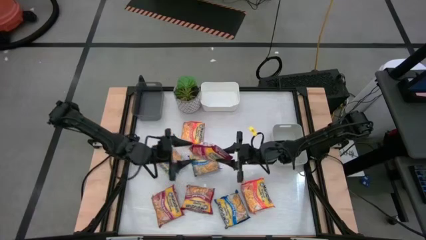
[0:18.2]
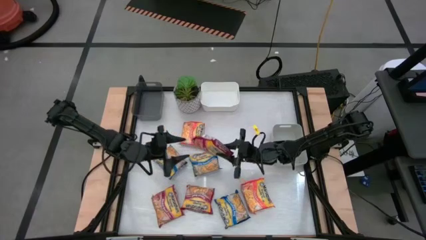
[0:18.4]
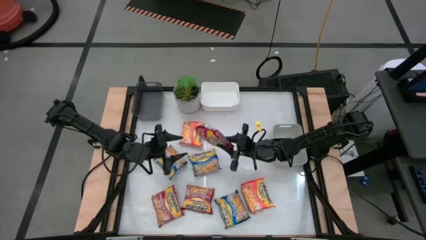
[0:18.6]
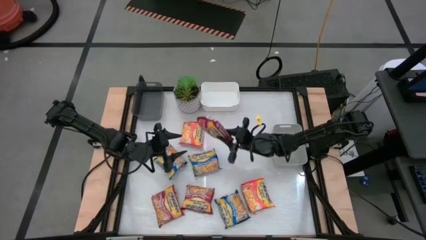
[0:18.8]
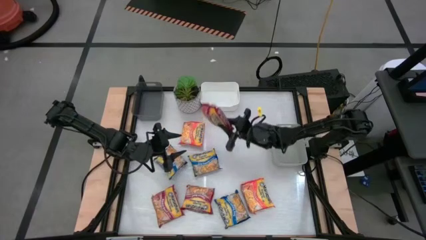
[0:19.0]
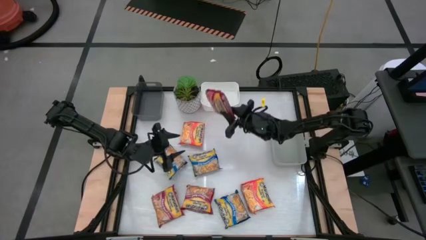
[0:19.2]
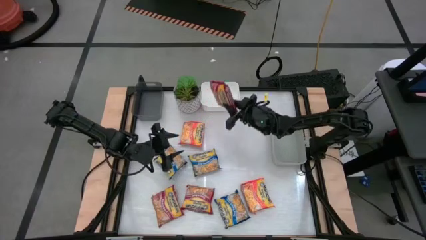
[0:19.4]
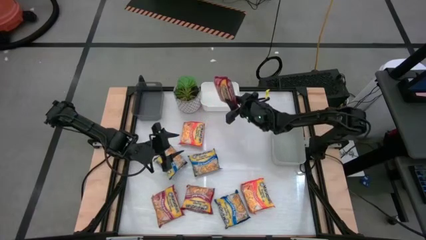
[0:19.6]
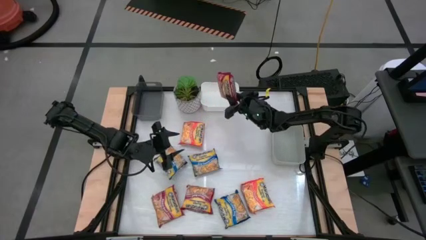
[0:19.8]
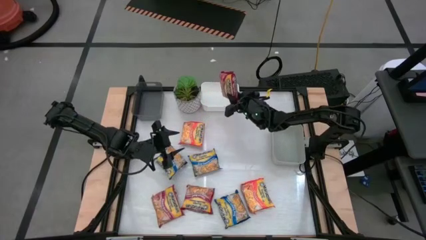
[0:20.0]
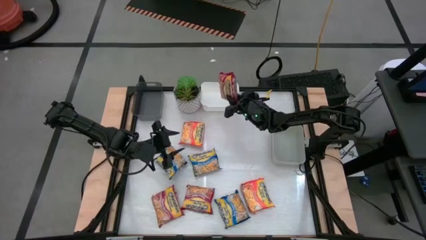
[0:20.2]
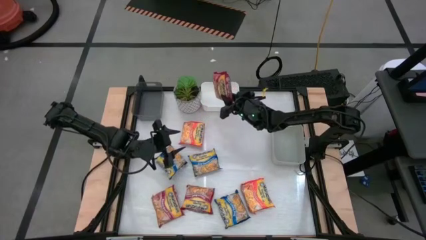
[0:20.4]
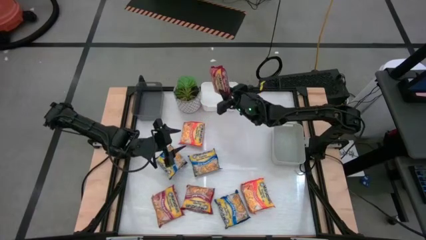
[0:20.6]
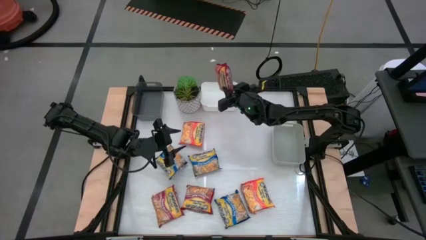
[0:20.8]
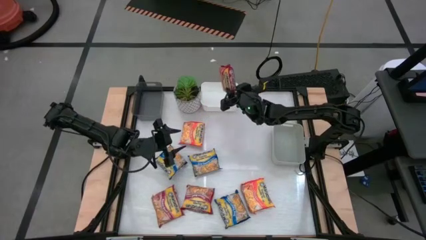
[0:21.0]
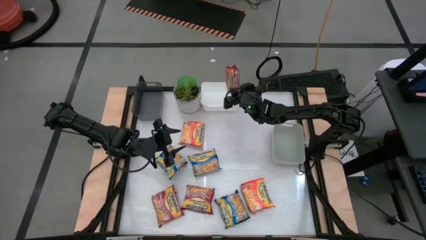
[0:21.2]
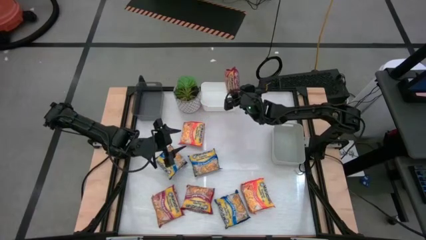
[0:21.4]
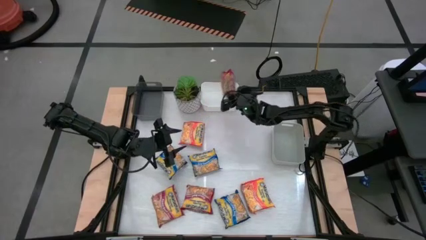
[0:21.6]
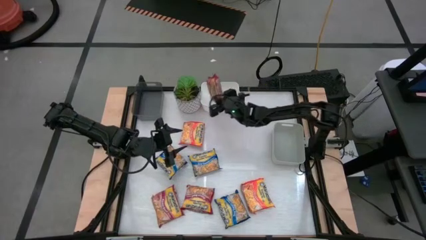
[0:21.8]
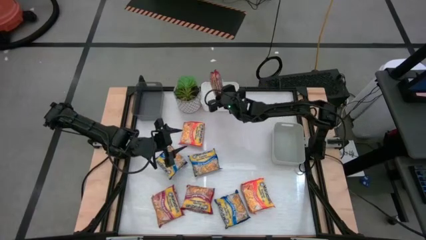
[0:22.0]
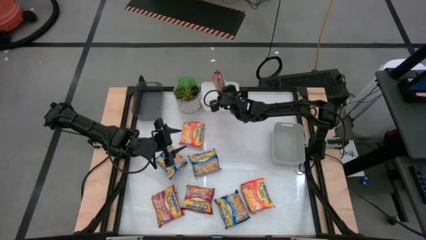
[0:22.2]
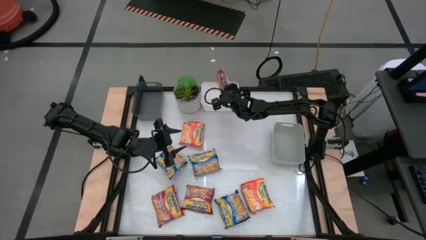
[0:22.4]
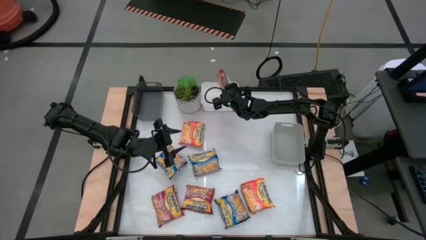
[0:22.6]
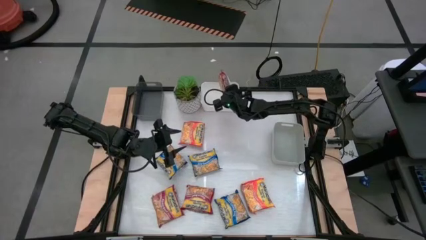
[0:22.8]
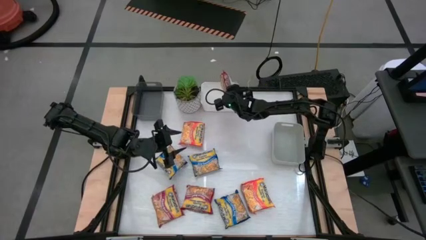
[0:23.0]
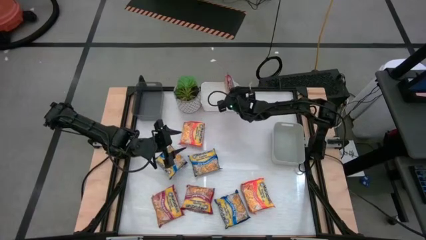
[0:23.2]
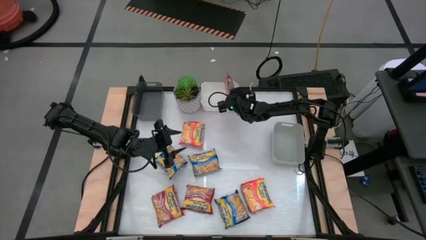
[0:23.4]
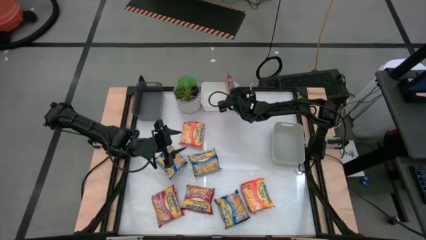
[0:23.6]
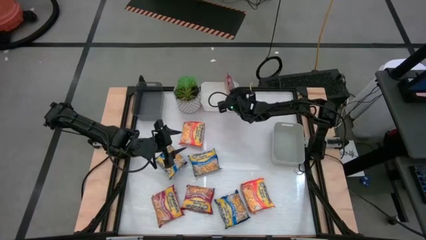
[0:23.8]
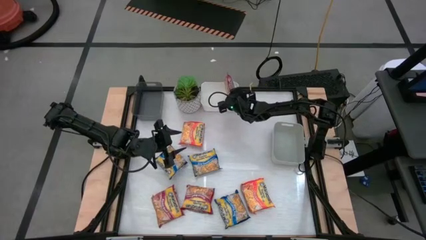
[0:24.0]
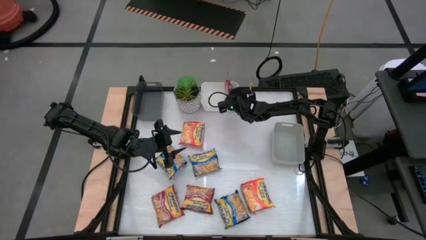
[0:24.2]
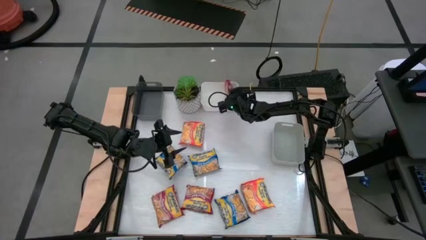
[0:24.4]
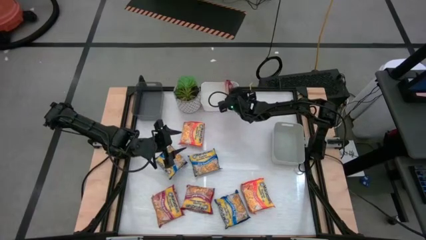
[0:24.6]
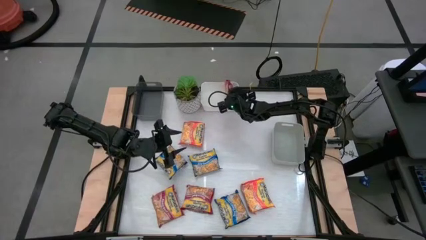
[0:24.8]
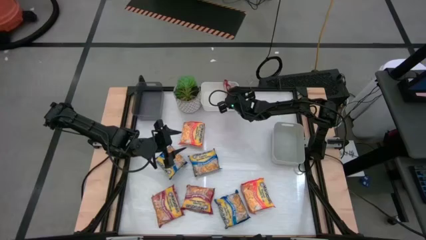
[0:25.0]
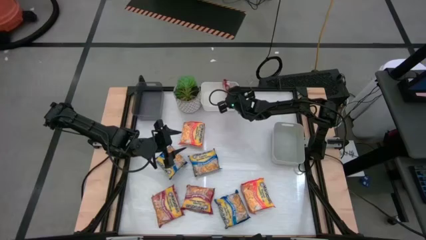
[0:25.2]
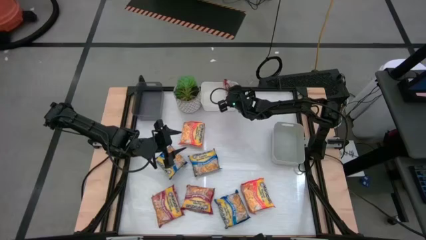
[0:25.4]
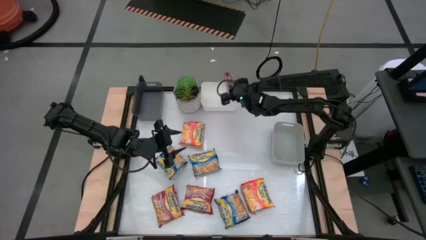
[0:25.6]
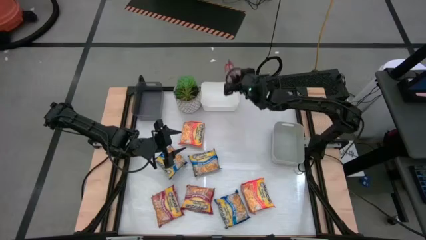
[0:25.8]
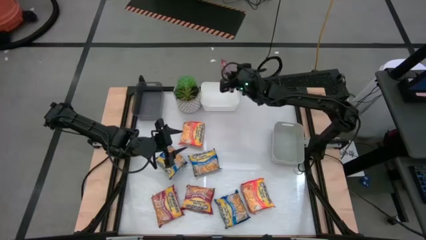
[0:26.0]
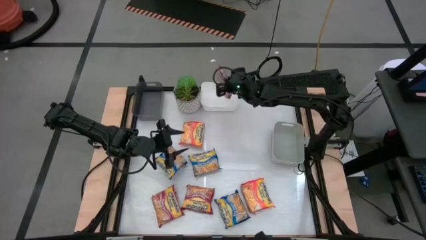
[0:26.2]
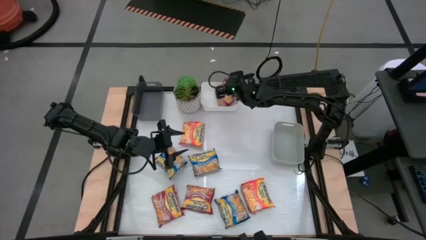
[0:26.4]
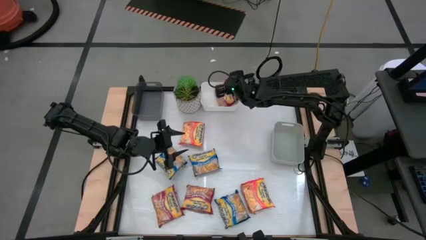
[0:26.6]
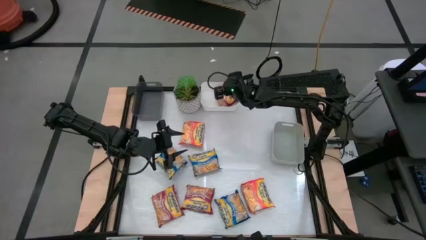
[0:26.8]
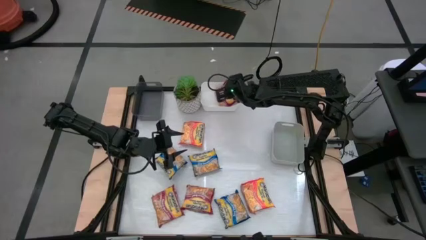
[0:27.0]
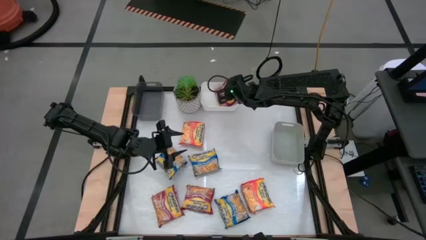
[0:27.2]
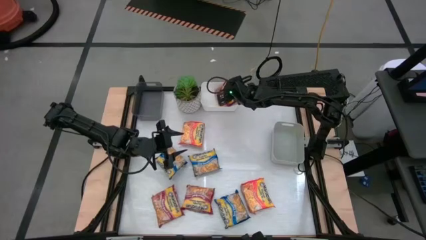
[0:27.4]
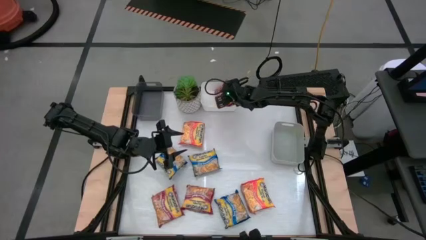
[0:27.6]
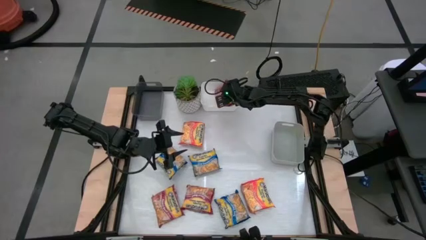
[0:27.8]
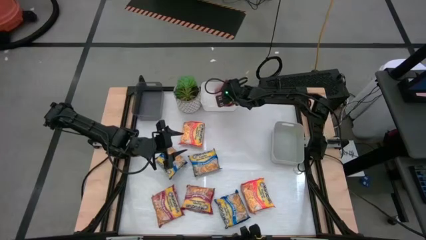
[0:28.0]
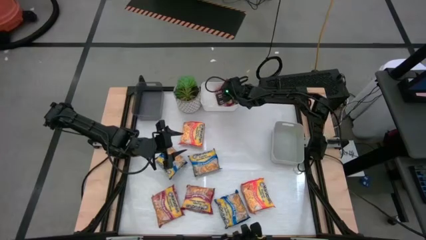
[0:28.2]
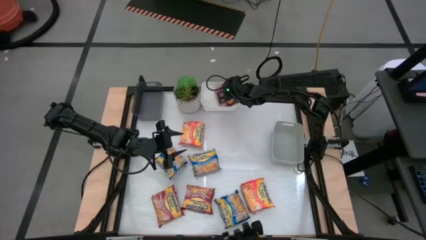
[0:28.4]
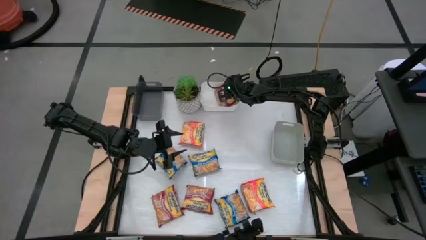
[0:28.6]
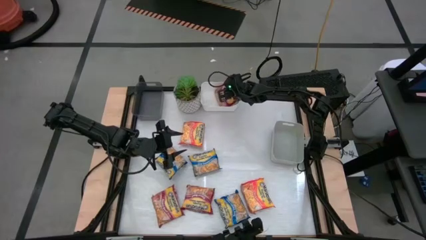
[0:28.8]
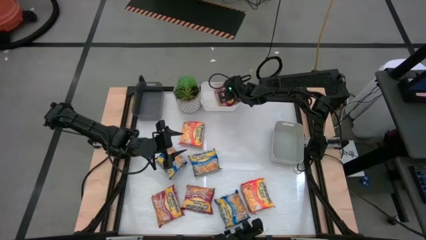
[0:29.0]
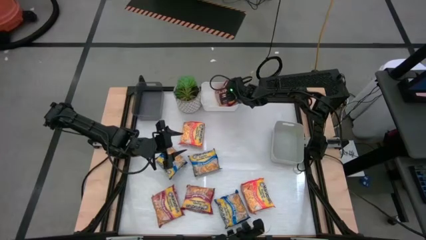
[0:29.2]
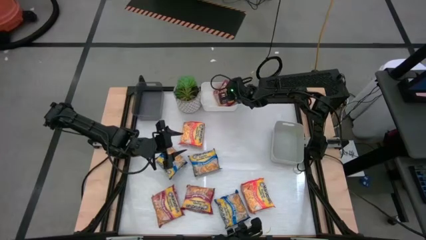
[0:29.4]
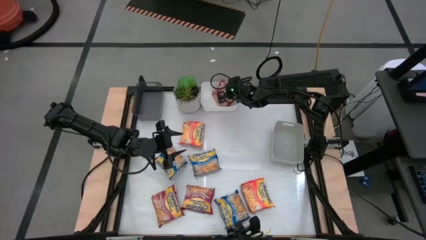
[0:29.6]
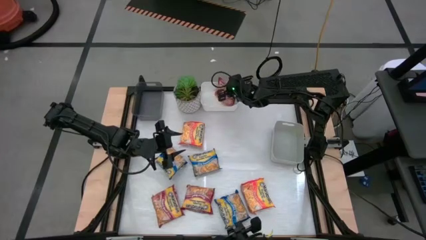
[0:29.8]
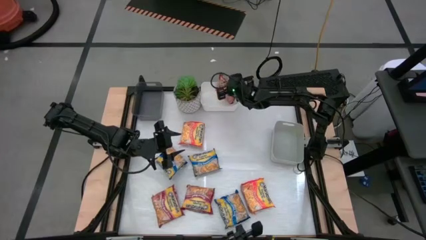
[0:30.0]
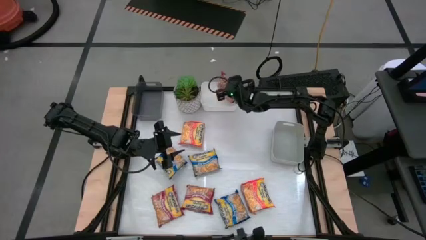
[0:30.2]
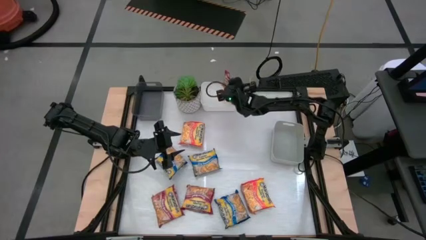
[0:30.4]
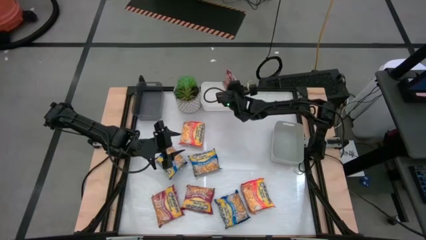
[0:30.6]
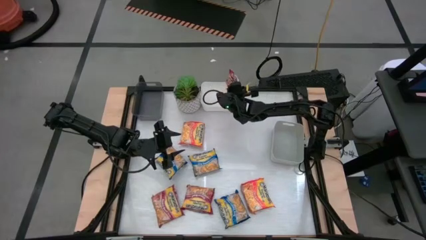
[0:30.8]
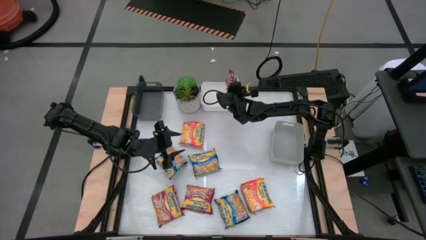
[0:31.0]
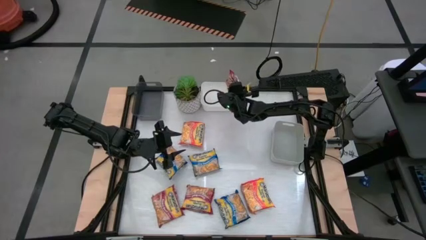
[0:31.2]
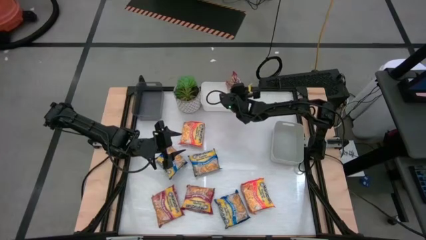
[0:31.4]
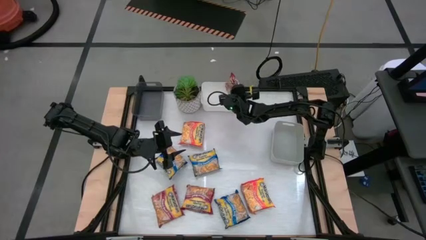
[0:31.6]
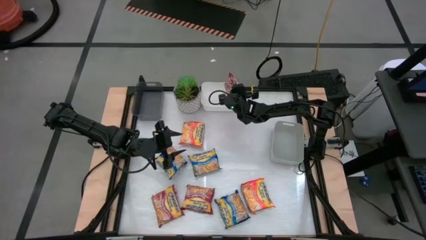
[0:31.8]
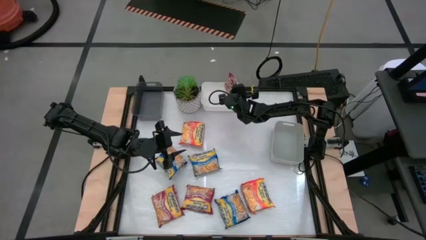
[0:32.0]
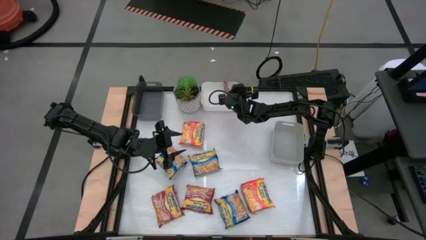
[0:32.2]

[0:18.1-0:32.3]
Task: Sort Maruchan noodles
Put the top red noodle pack into the white bin

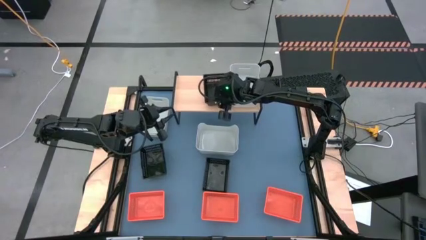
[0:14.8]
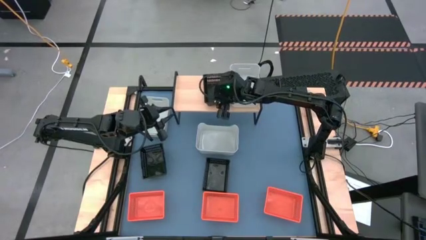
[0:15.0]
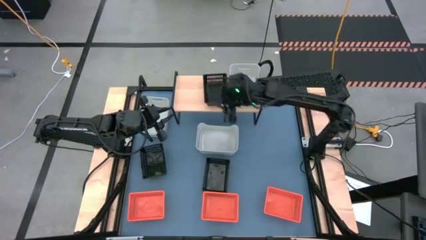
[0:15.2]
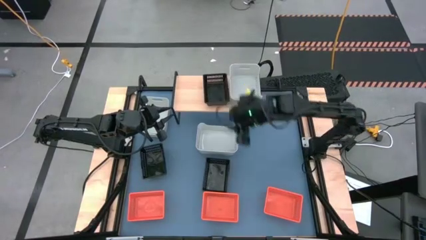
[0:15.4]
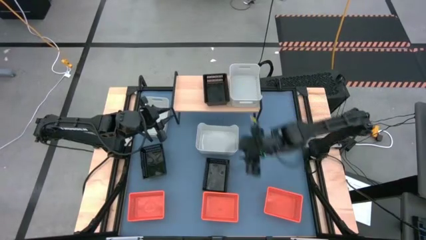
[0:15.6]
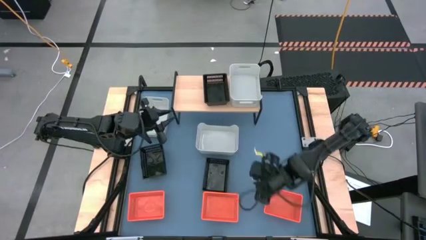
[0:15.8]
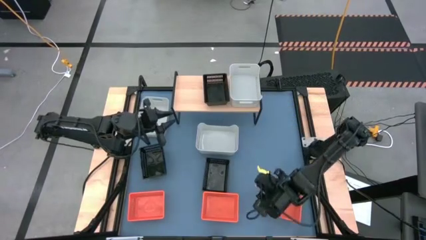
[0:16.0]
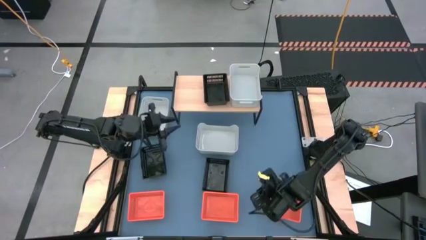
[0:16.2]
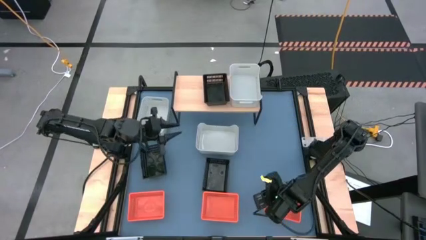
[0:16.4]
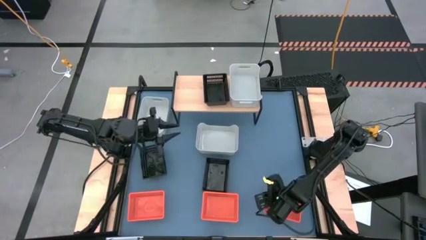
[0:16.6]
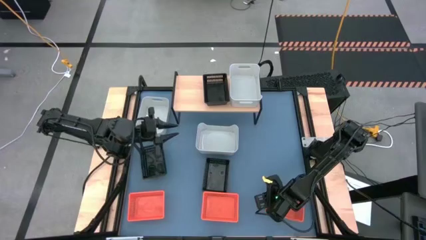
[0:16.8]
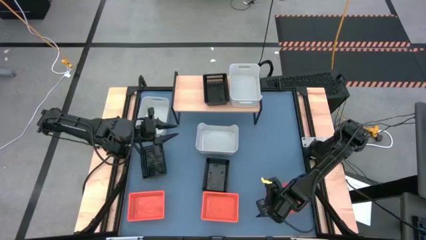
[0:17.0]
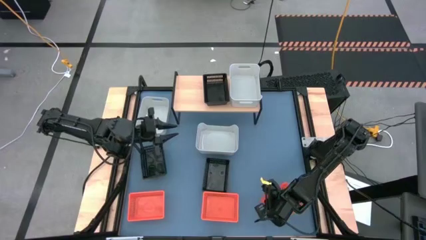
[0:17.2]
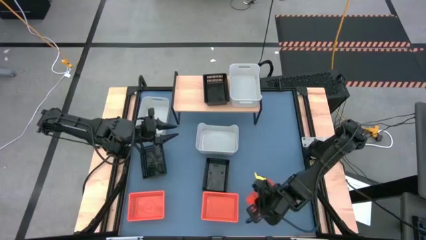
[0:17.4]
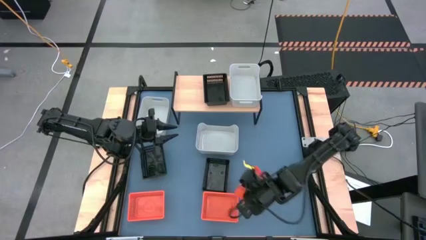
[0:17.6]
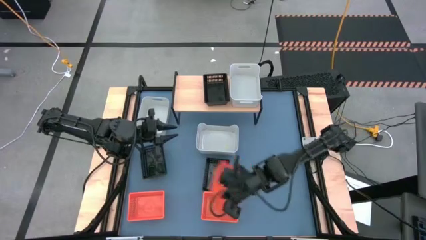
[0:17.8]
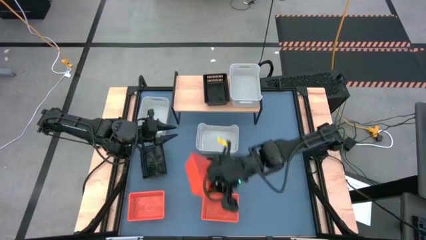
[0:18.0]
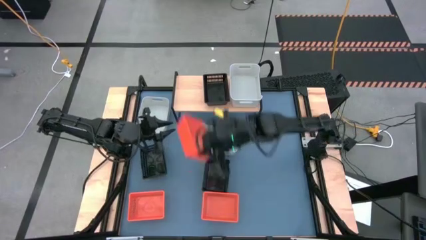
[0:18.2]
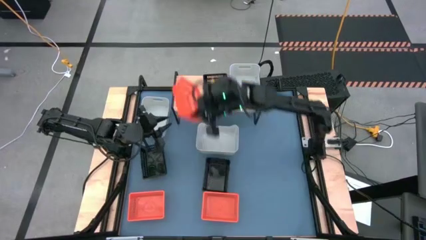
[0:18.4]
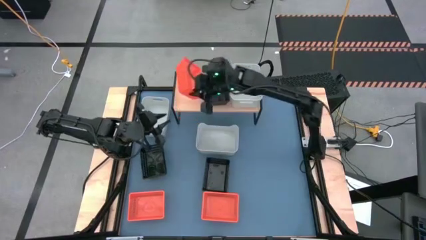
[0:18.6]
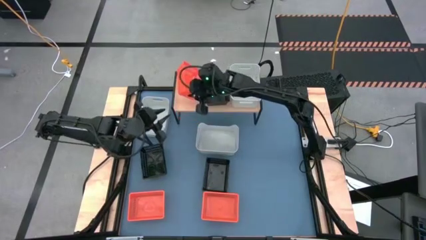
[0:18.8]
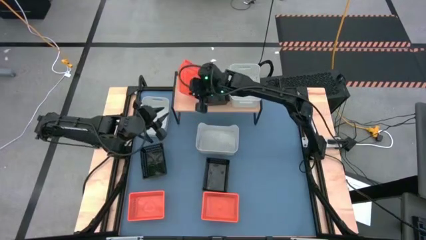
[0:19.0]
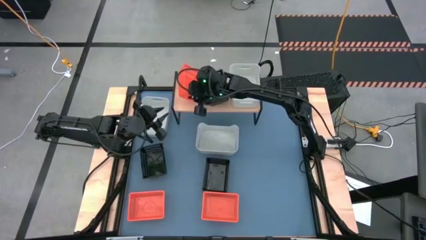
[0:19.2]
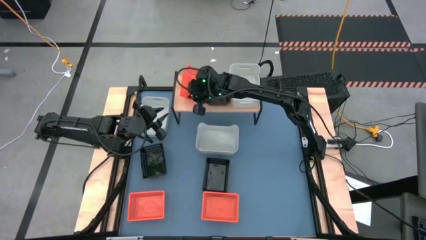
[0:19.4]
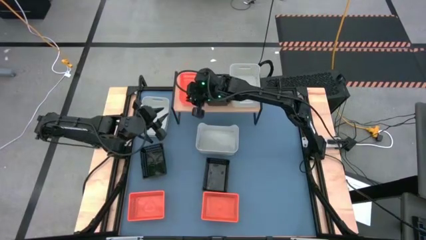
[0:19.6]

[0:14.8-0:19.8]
Task: Stack baskets on shelf by color
Put the right orange bin on the shelf
